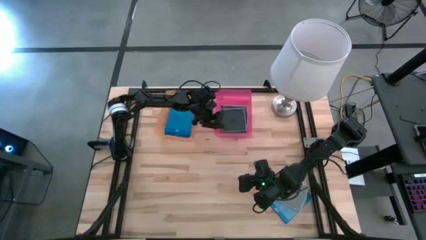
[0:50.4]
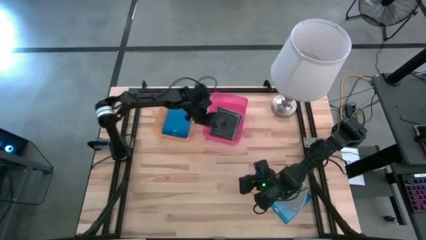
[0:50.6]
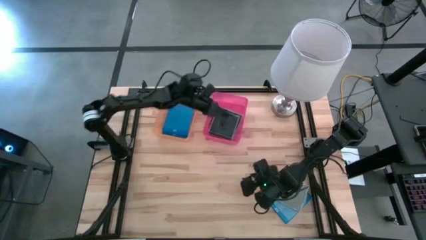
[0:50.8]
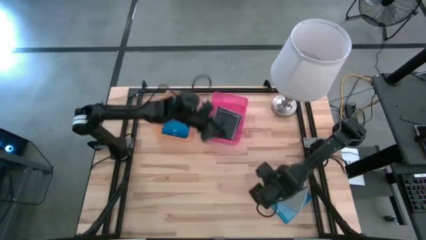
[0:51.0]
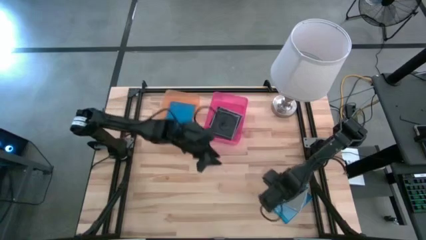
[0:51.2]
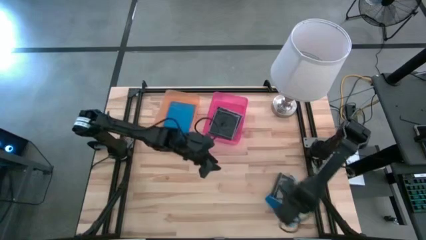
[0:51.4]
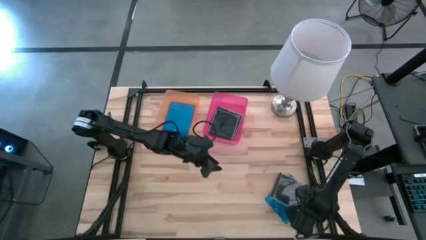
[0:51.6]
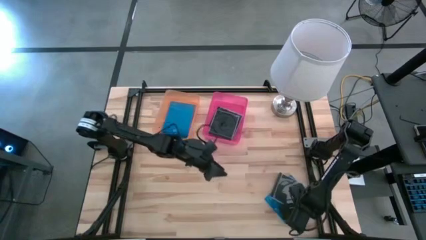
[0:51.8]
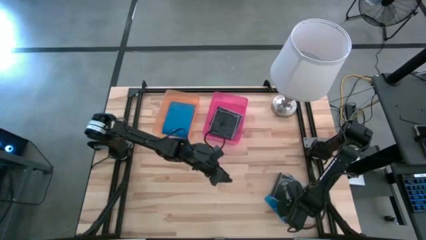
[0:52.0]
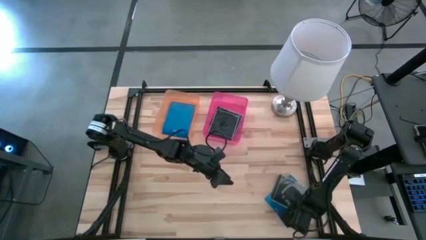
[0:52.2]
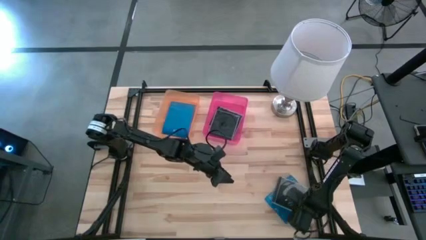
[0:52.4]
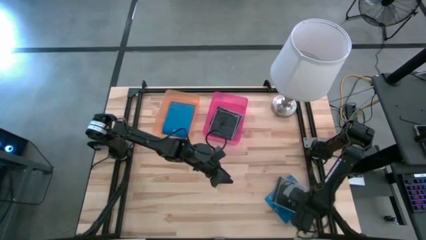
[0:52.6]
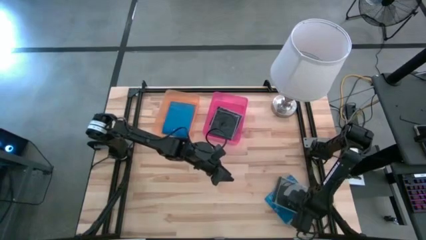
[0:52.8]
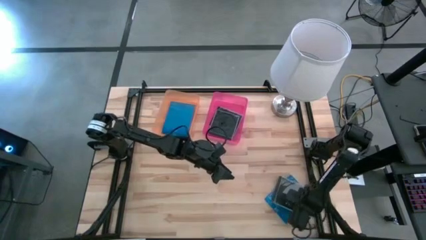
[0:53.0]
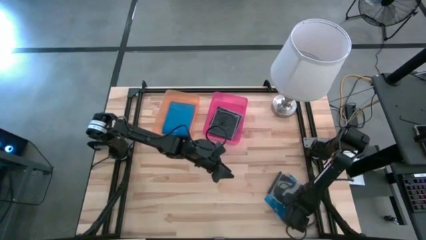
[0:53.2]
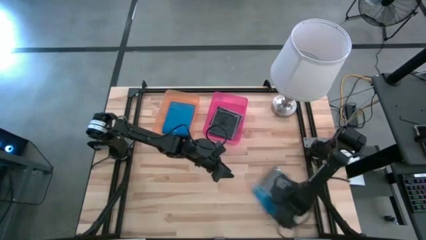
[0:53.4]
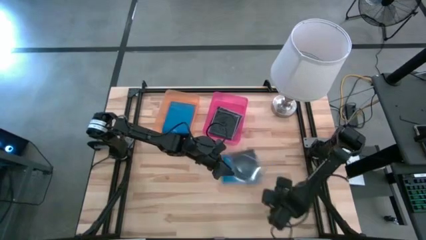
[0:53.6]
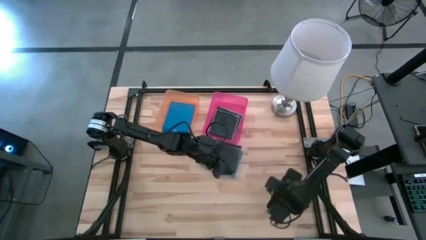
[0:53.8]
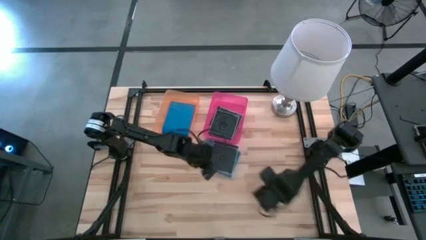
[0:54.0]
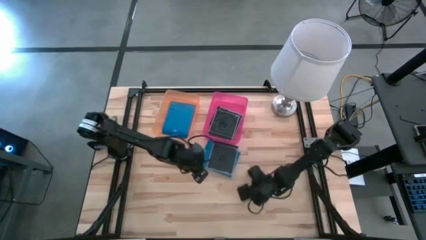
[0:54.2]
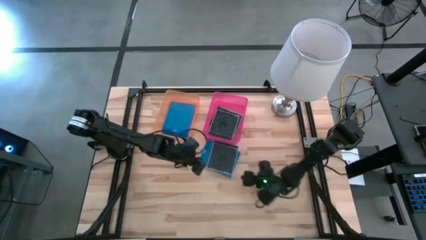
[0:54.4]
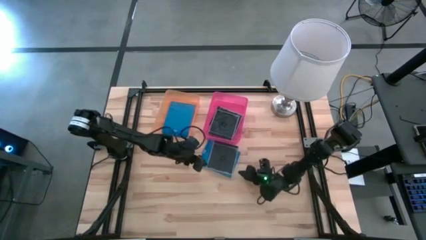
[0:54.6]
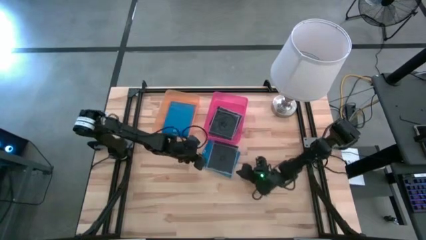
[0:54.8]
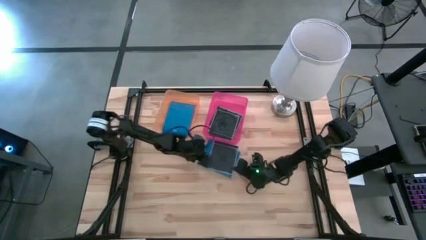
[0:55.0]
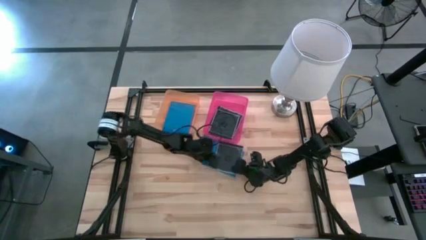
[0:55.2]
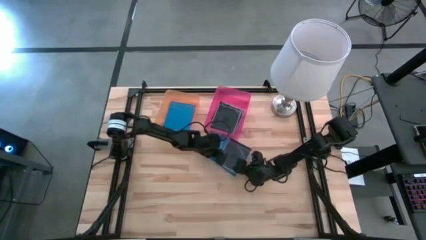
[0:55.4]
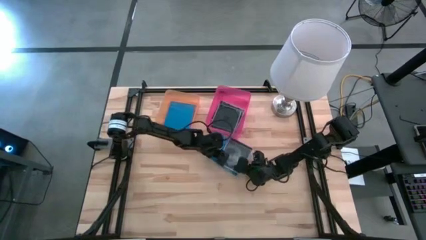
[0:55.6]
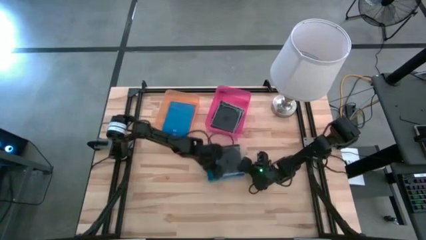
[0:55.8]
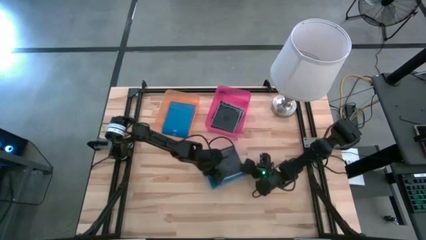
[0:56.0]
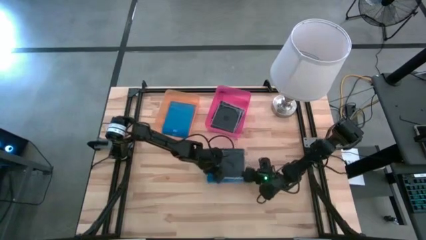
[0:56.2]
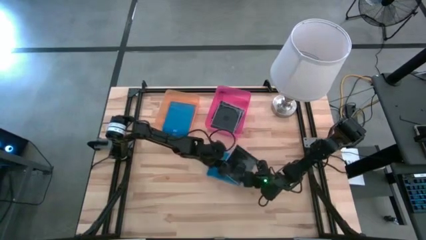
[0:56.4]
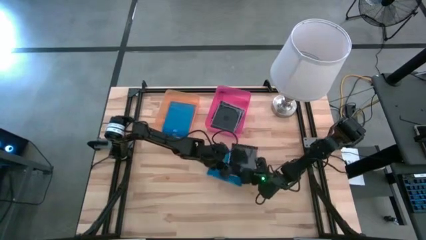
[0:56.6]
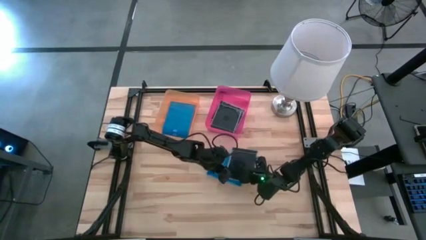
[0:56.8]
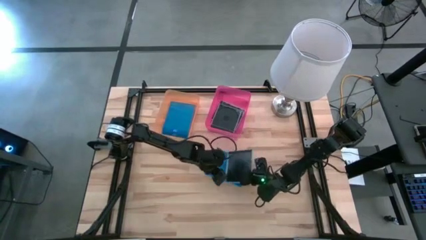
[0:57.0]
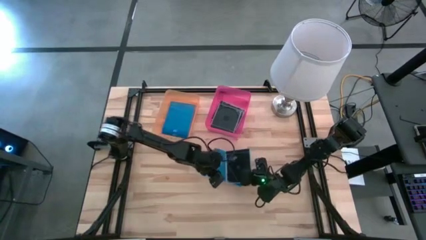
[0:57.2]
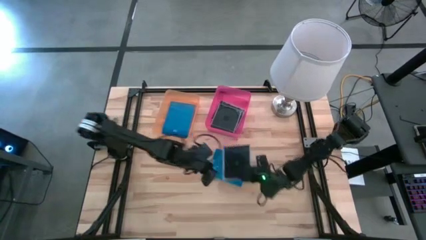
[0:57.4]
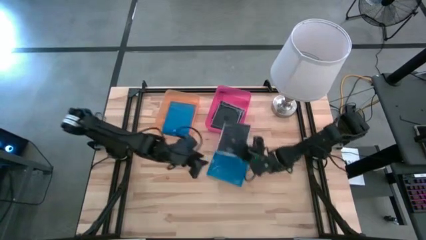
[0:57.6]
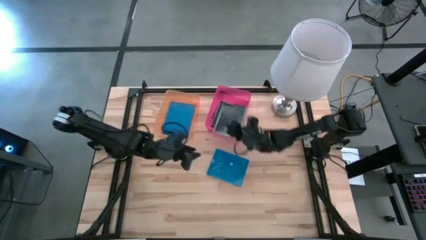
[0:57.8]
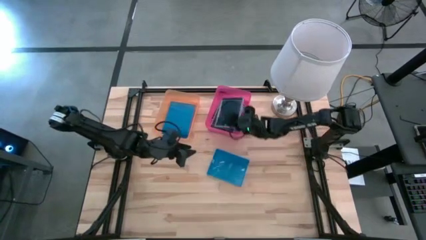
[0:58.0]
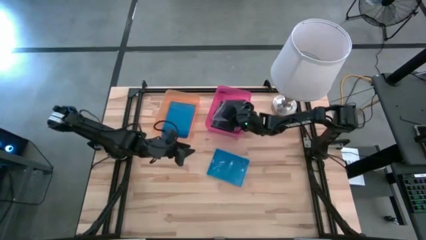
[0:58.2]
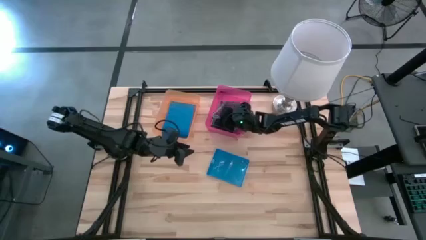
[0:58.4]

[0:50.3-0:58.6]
Task: Pick & place jewel cases by type
Put the right black CD case into the pink bin

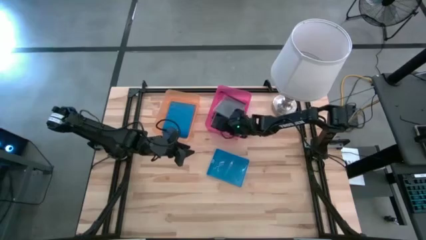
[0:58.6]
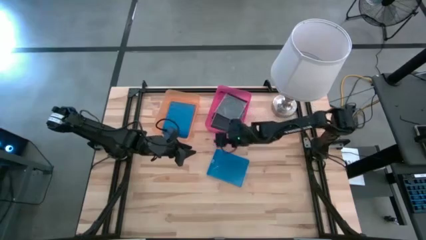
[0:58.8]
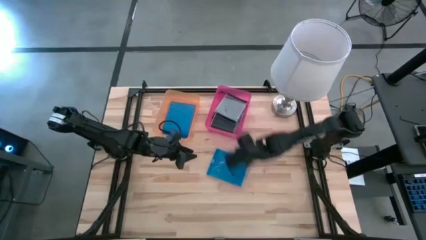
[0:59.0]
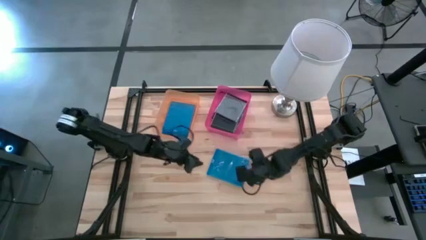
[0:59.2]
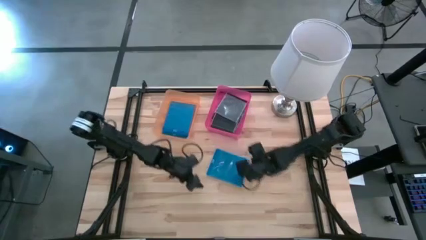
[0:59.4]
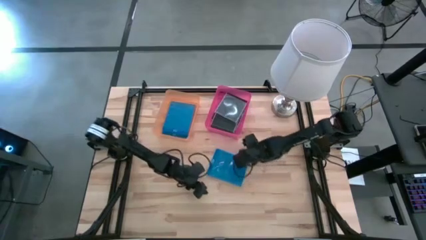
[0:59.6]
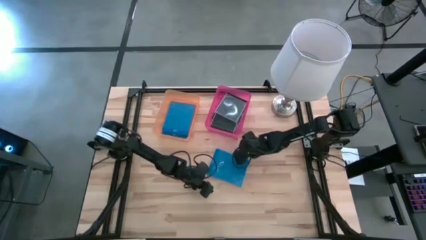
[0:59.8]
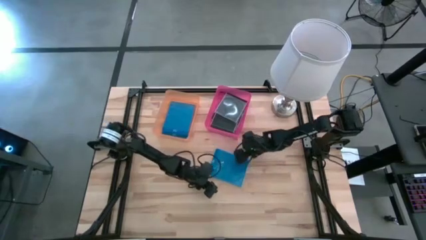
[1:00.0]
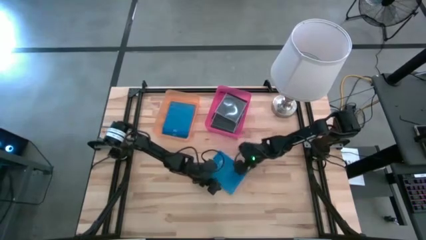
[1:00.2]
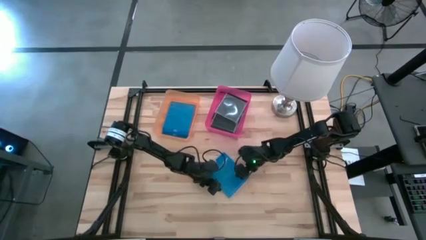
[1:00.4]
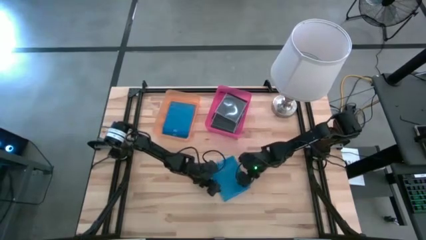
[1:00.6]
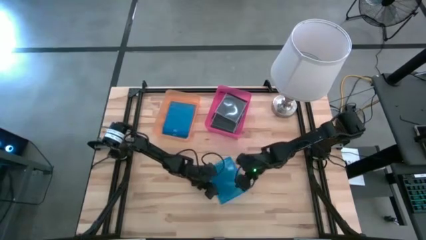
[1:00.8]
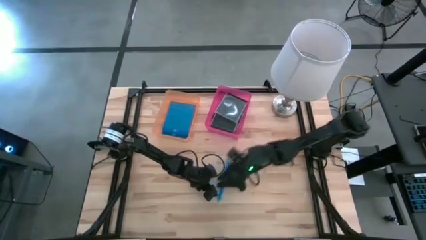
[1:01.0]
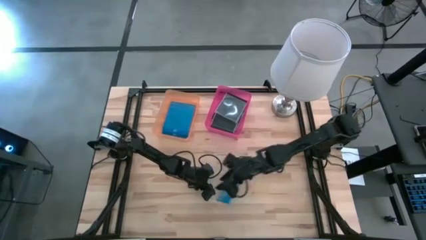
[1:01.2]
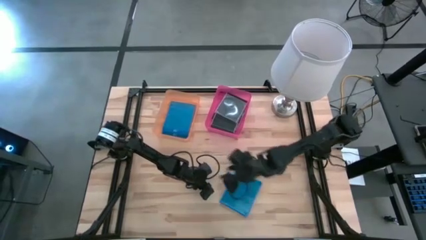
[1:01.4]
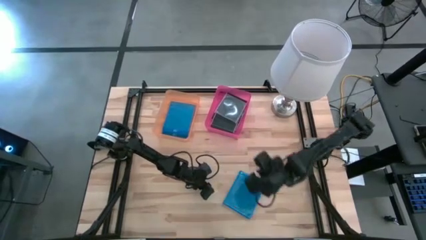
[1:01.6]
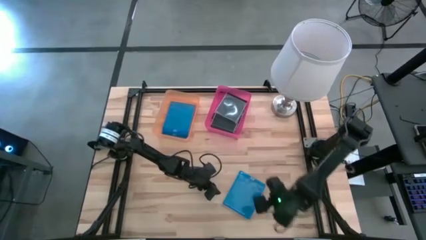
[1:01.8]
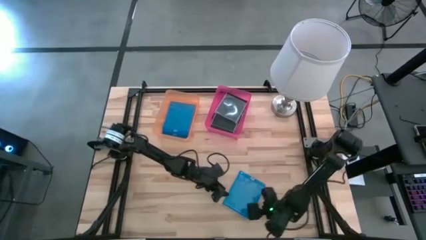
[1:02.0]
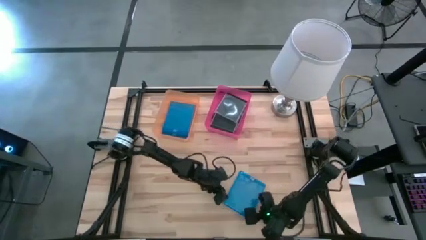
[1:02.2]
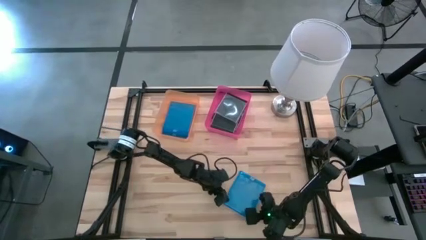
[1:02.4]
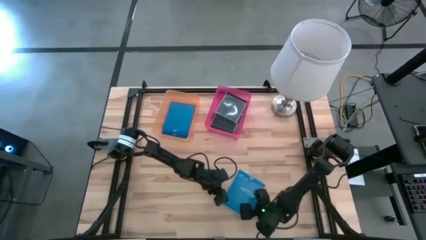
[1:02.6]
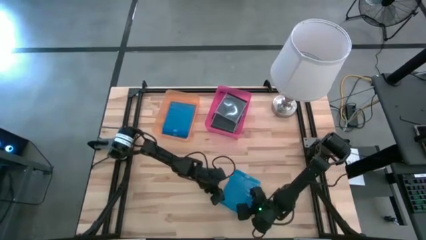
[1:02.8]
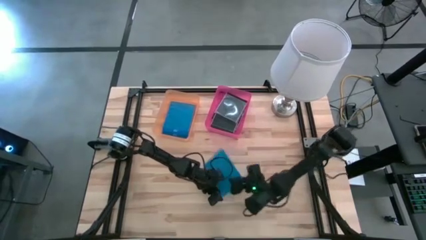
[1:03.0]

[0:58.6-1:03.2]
Put the right blue CD case into the orange bin

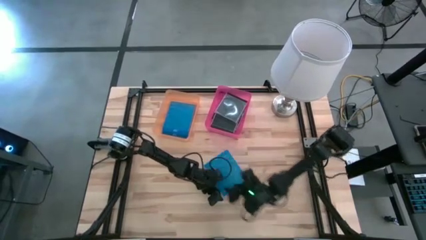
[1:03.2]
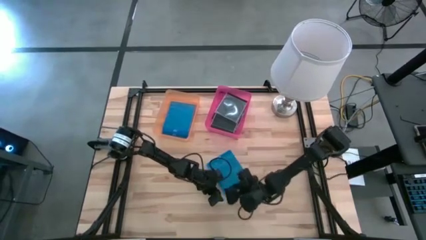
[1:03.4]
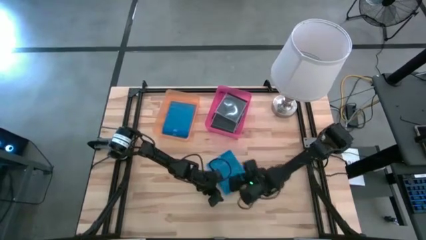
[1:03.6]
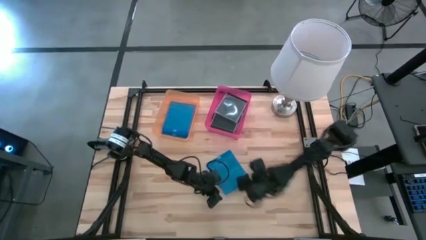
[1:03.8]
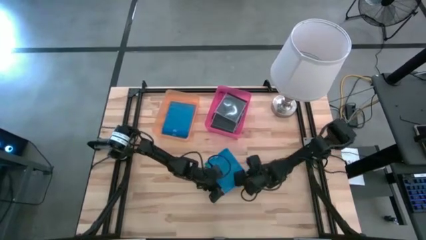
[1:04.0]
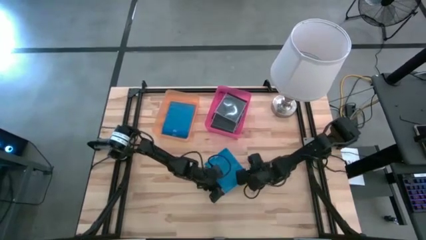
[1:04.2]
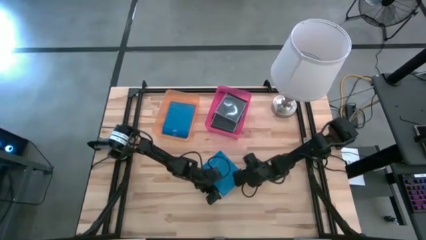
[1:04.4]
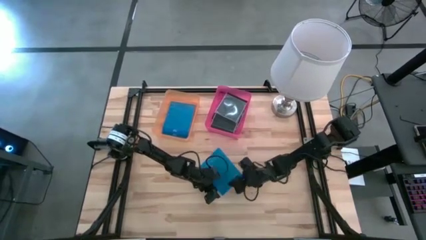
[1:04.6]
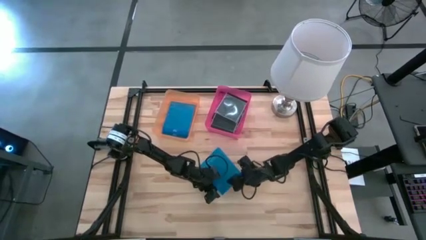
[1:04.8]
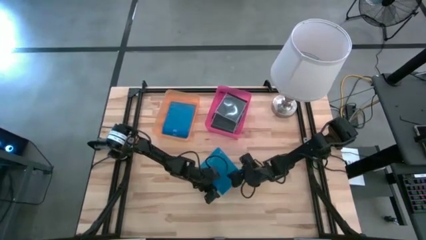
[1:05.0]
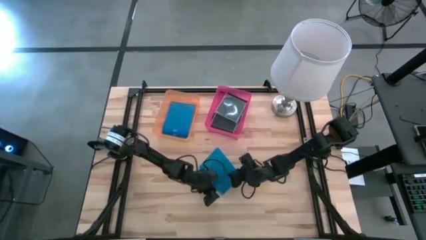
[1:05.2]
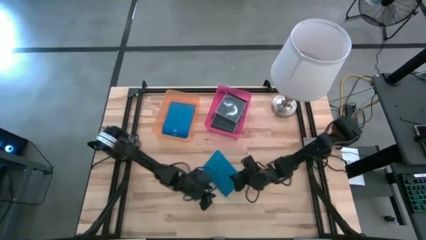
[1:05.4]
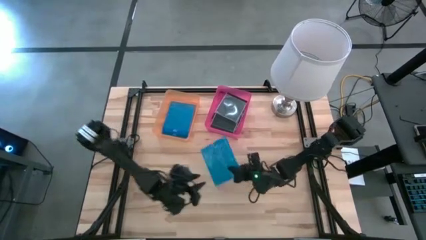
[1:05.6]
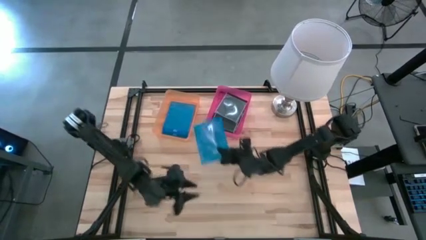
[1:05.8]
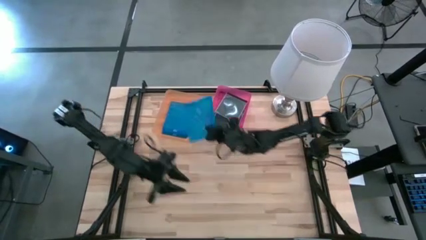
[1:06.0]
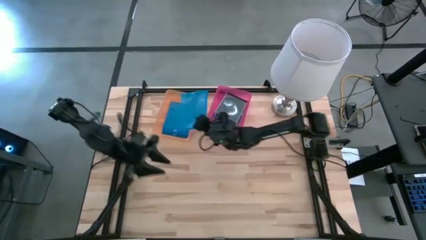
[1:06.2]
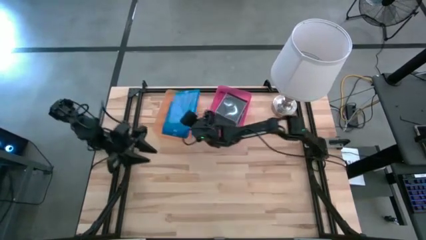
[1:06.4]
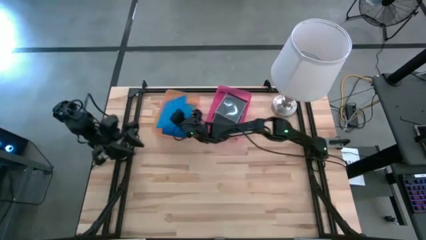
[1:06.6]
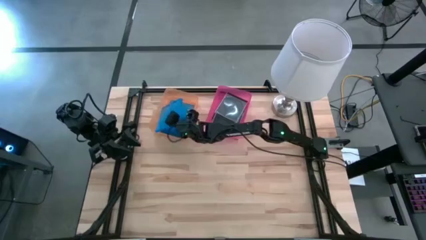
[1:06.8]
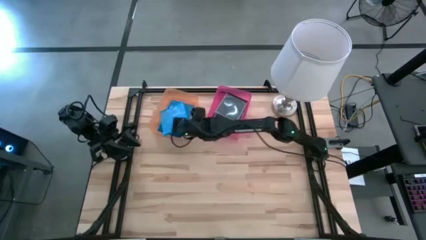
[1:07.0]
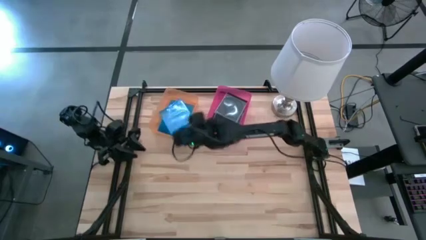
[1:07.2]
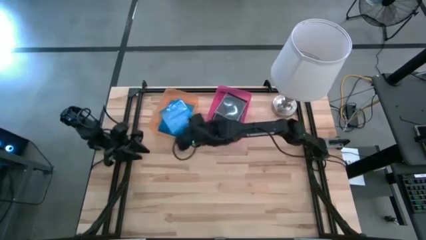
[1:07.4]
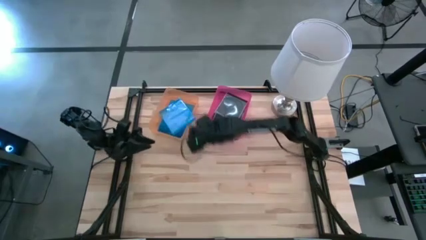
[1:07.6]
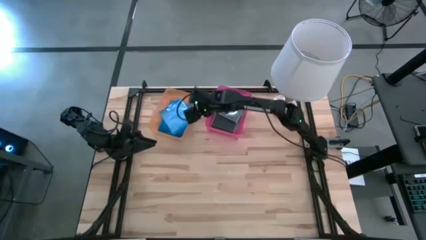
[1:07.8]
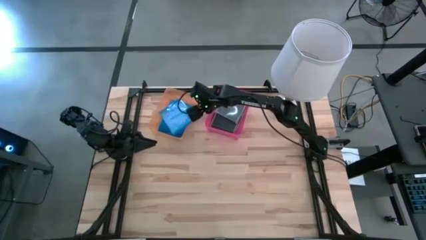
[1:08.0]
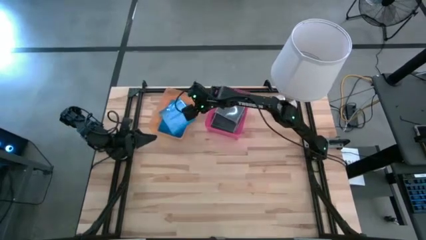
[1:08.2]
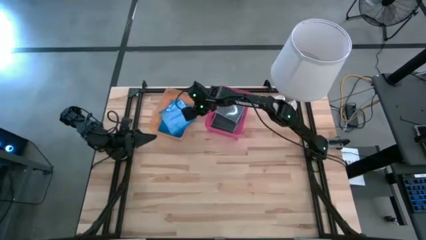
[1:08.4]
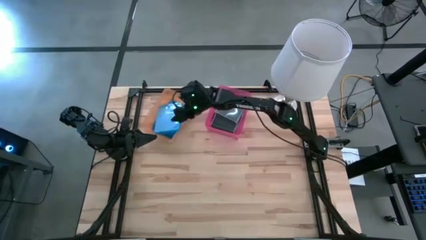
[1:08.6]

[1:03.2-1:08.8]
Put the right black CD case into the pink bin
